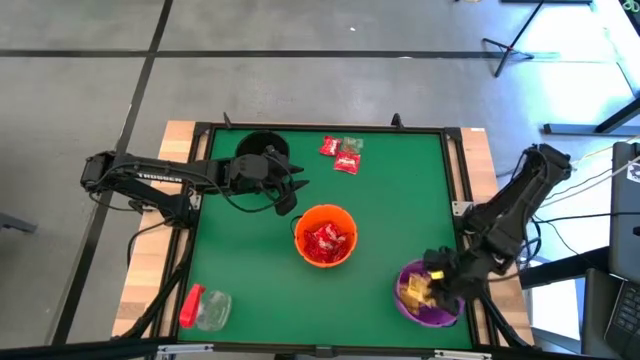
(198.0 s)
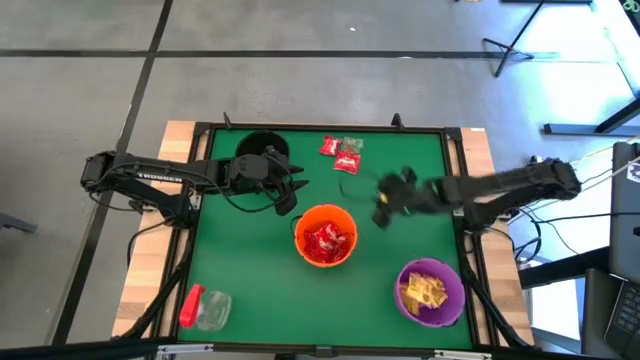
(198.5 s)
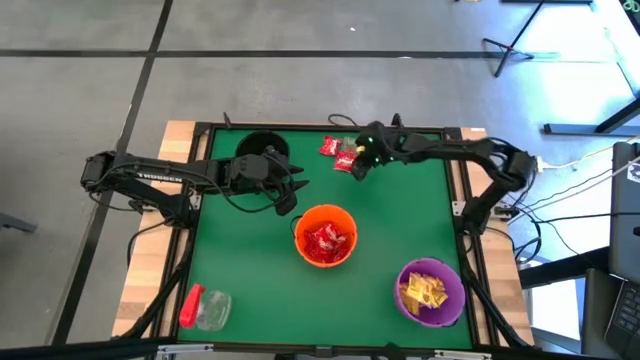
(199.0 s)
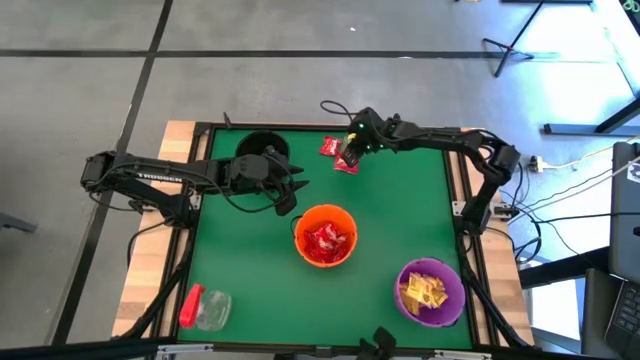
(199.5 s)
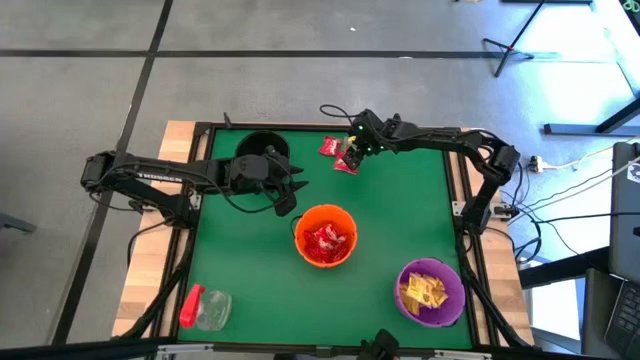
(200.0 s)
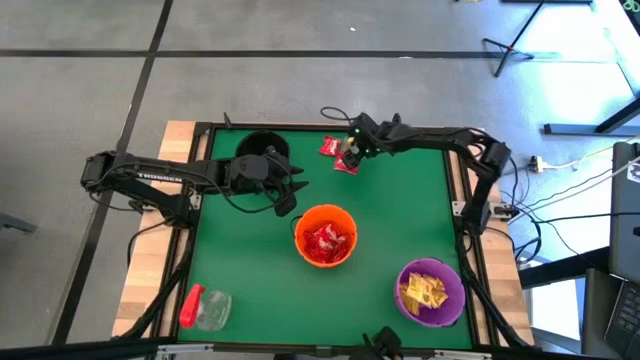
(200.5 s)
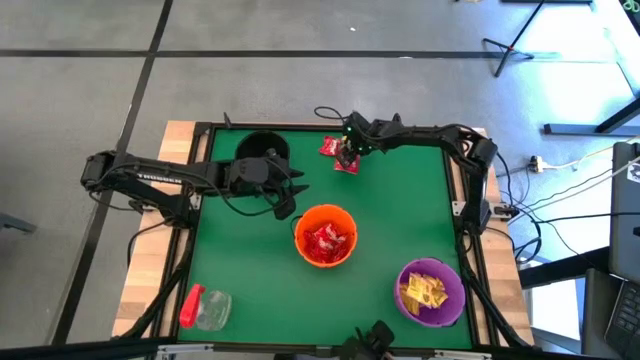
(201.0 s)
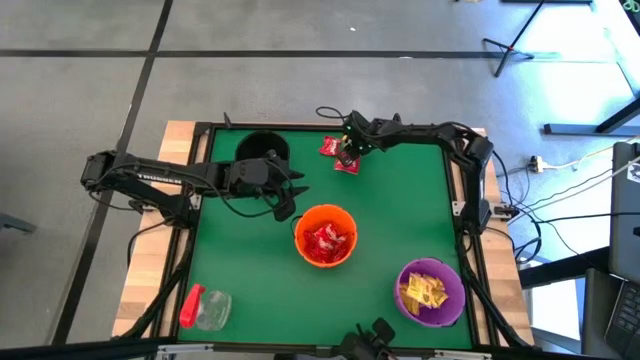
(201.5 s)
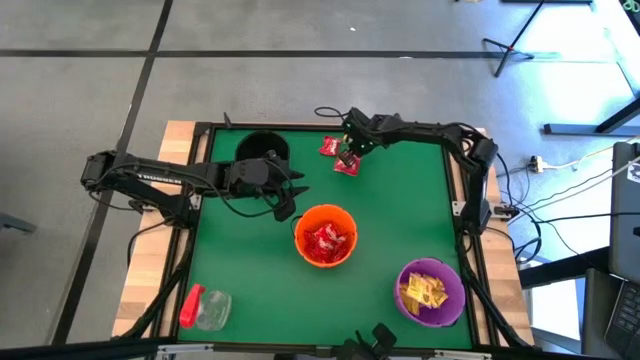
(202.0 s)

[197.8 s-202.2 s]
Task: Sort candy
Put the orange candy into the black bin

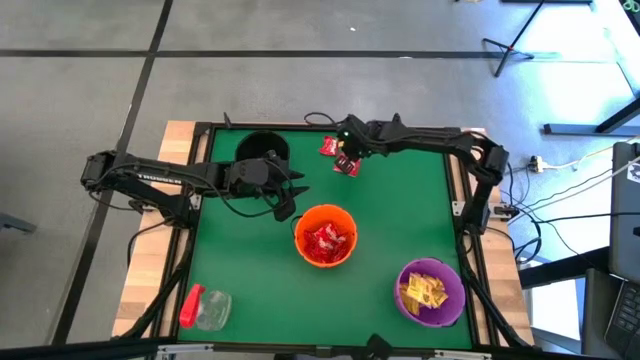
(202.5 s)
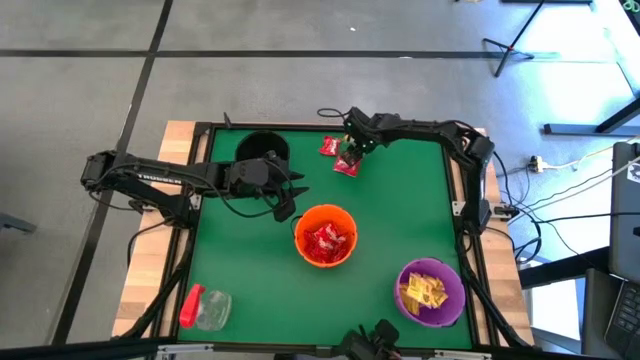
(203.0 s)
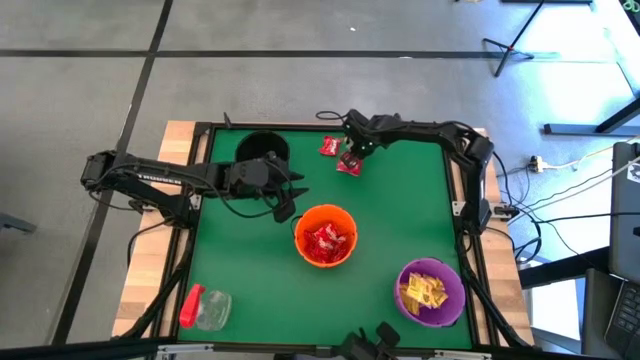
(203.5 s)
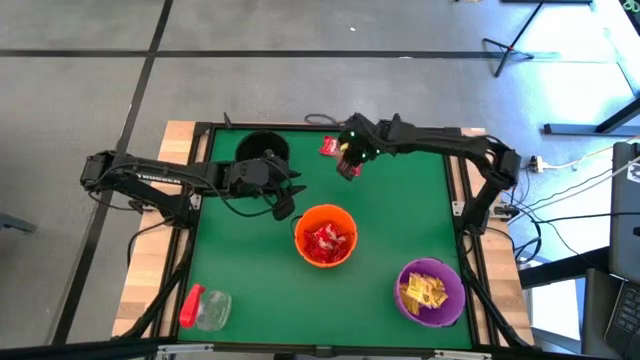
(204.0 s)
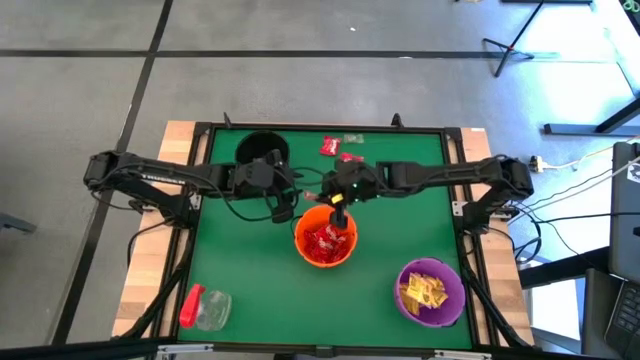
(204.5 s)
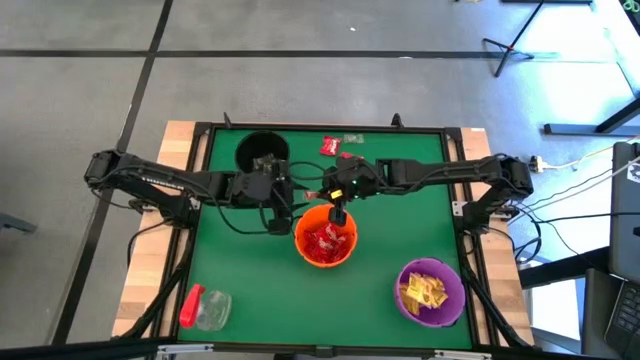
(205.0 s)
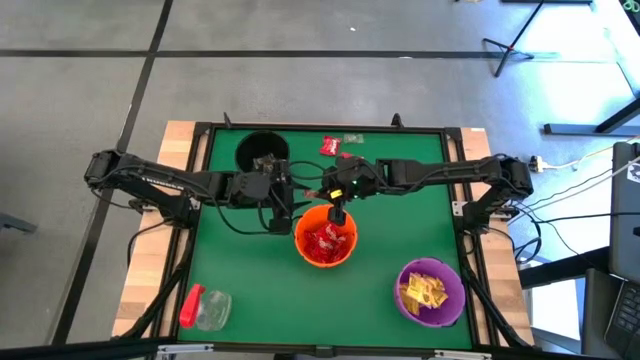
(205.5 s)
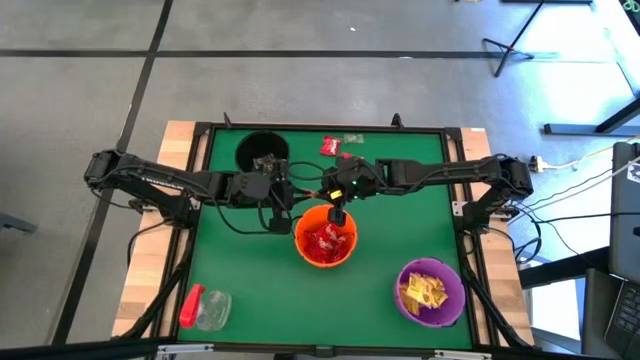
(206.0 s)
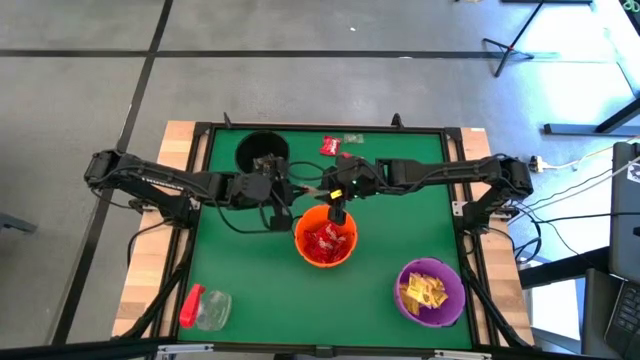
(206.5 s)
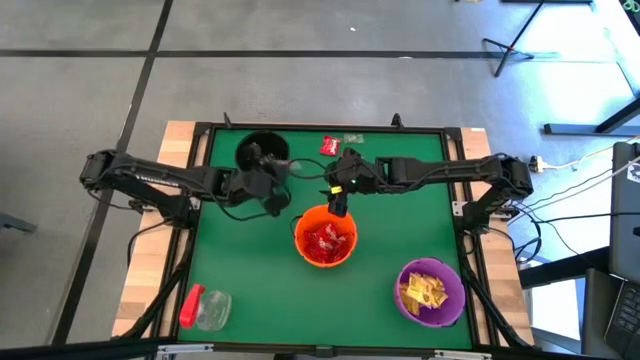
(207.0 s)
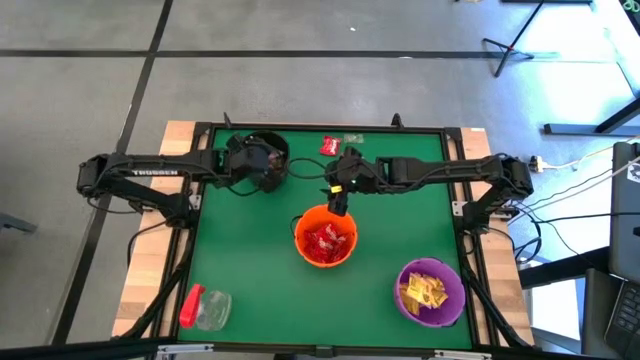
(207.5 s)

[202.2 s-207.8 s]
Put the orange candy into the black bin

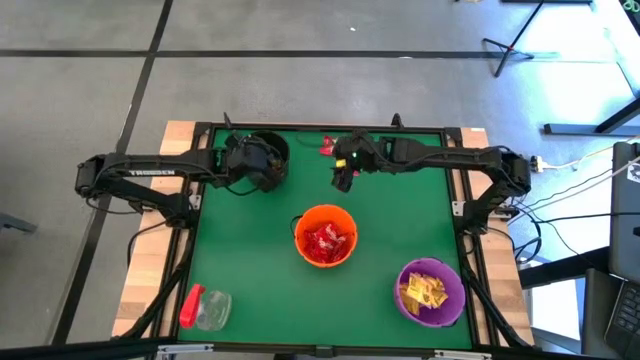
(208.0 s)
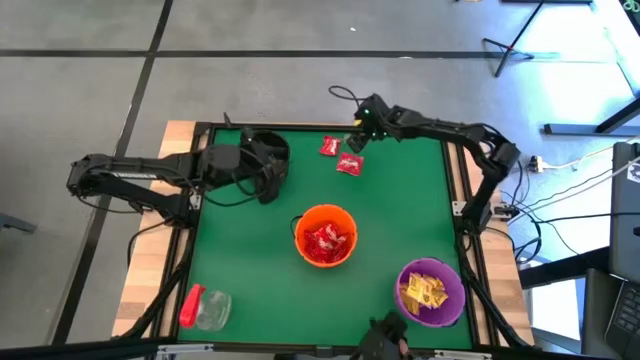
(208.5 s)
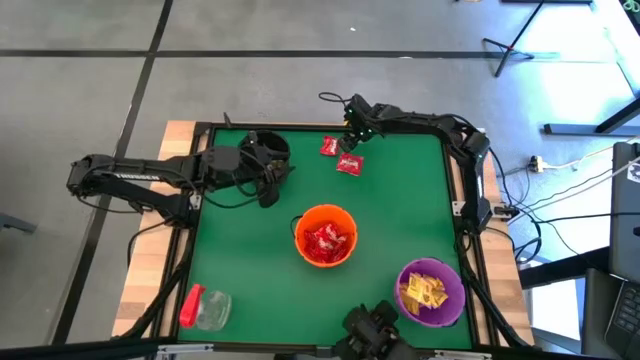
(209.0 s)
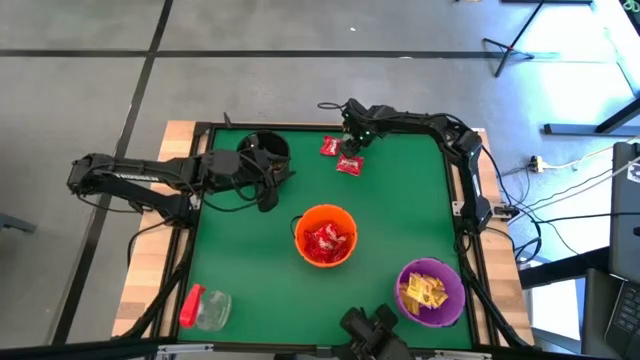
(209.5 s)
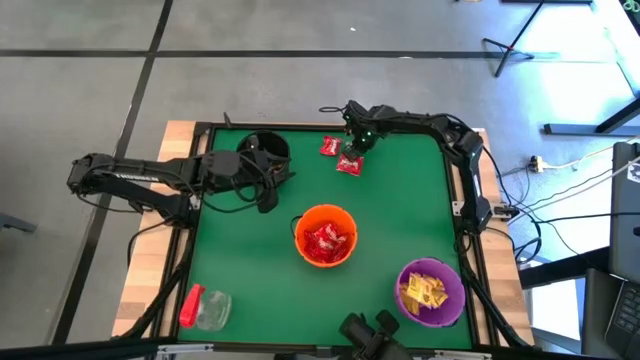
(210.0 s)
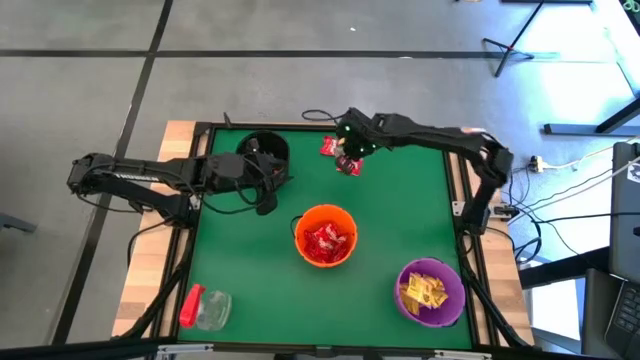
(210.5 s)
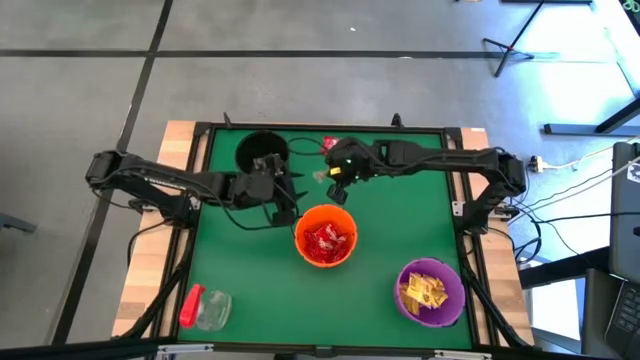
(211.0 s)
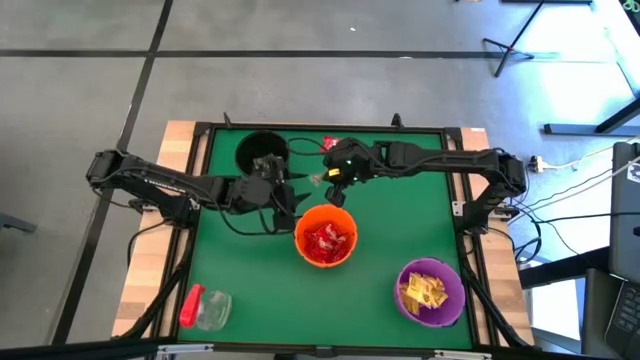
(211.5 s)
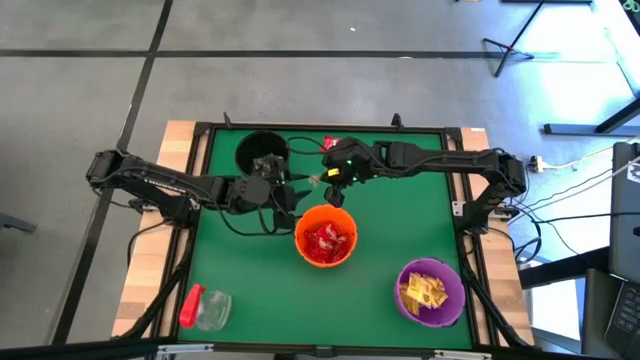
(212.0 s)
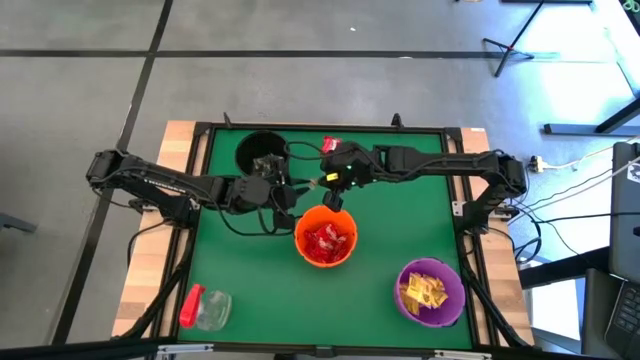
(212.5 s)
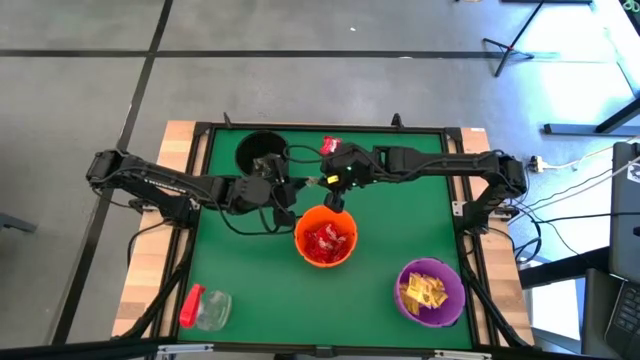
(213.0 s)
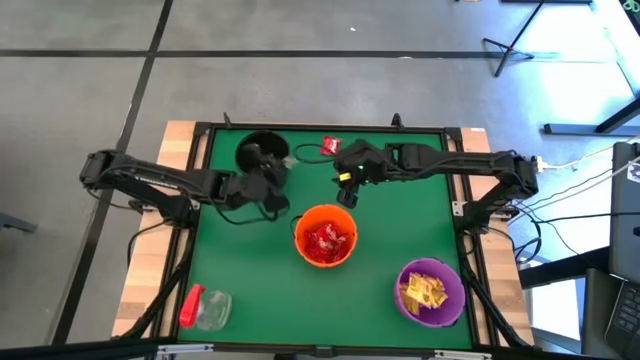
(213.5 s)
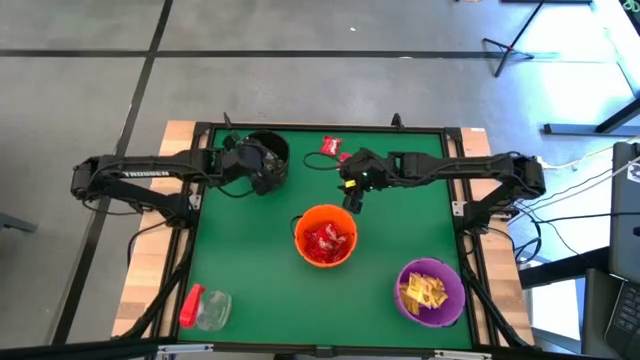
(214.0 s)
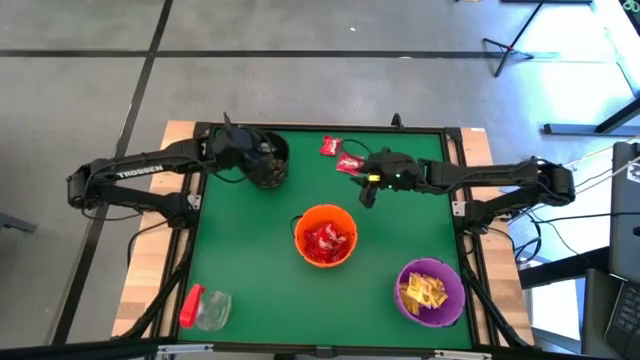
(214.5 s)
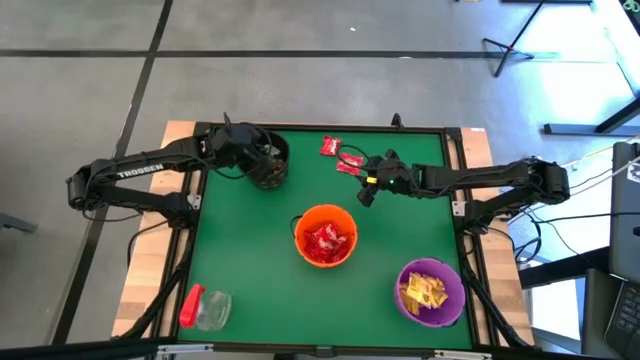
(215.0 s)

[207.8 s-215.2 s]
Put the green candy into the black bin

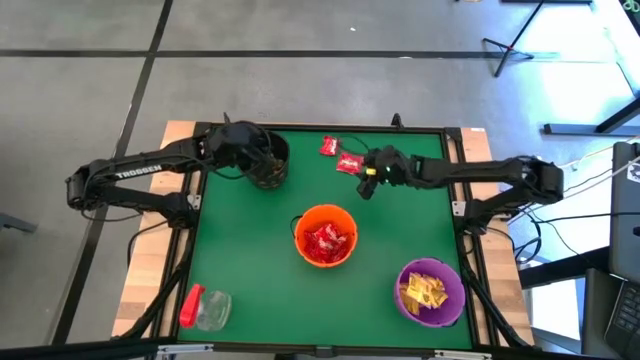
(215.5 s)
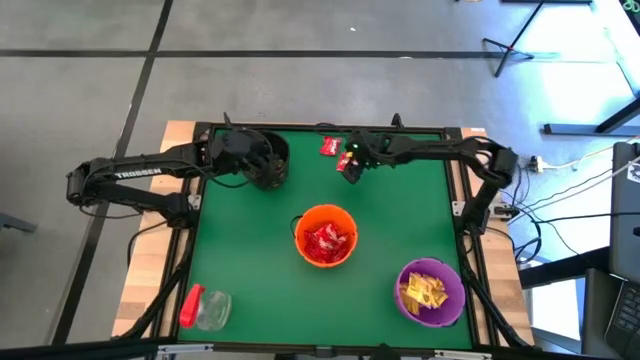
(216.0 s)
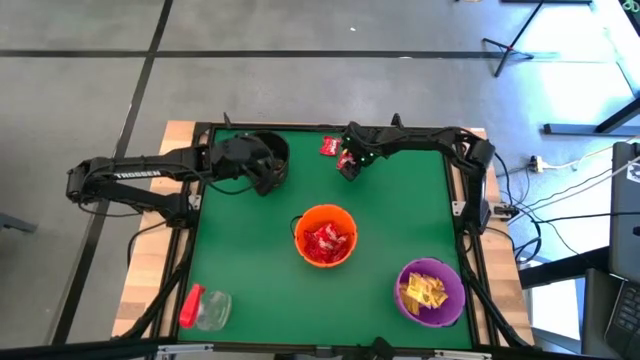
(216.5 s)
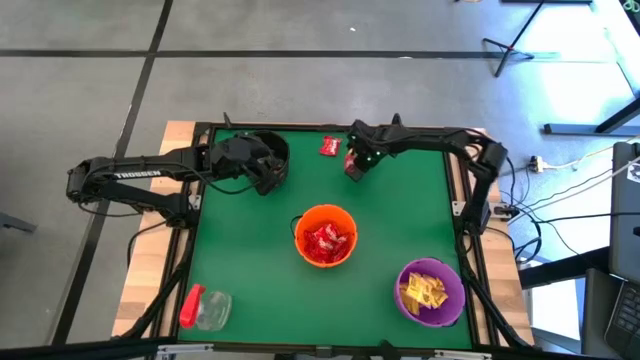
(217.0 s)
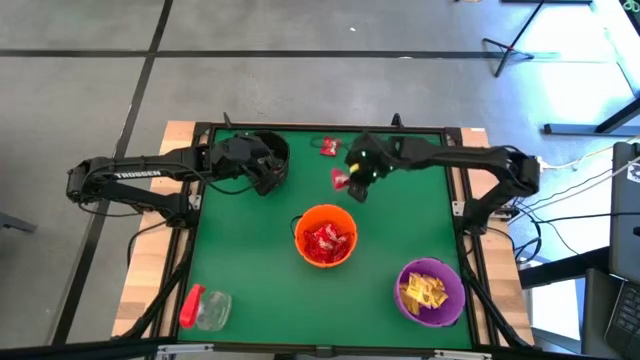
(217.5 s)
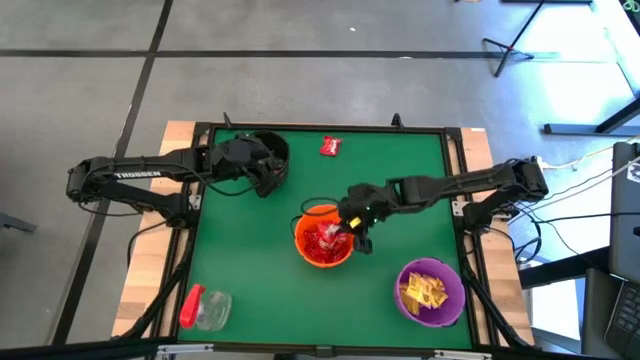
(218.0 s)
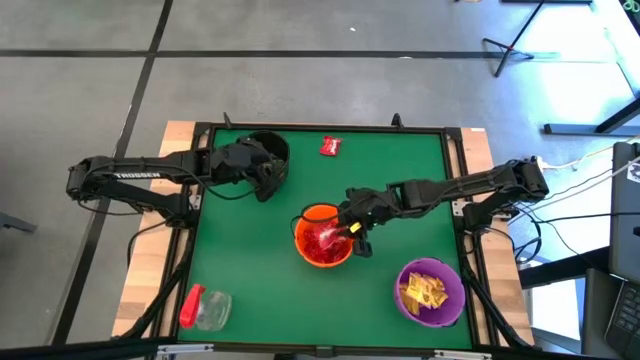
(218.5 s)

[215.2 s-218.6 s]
Put the red candy into the orange bin
